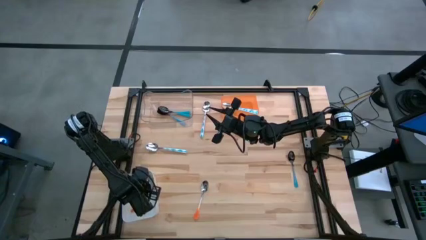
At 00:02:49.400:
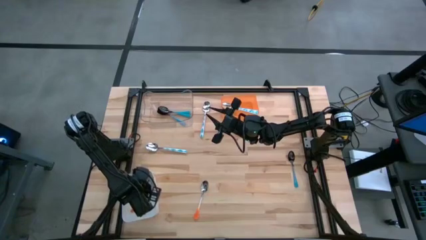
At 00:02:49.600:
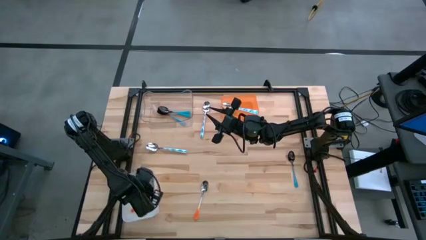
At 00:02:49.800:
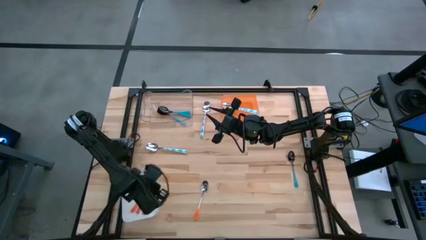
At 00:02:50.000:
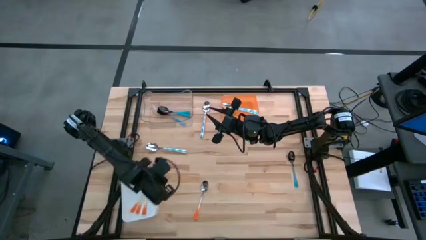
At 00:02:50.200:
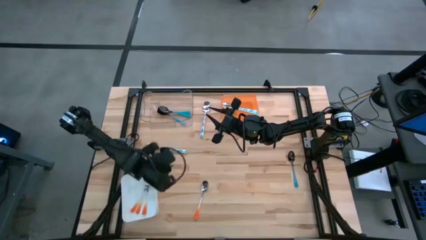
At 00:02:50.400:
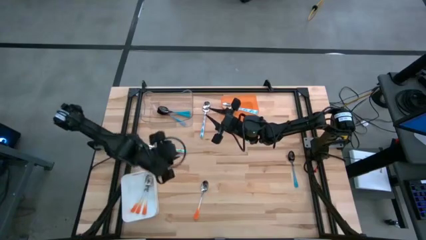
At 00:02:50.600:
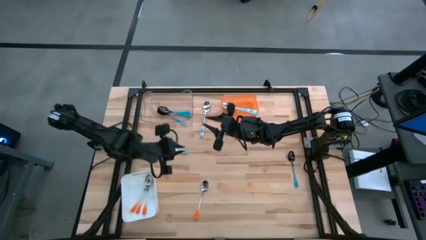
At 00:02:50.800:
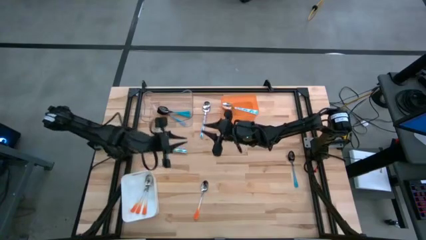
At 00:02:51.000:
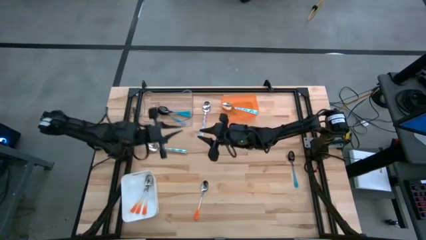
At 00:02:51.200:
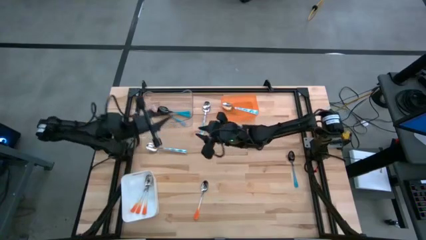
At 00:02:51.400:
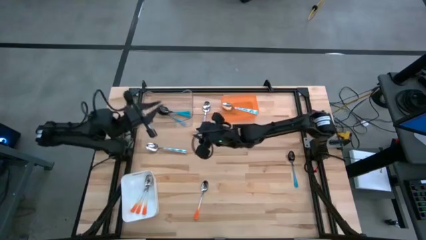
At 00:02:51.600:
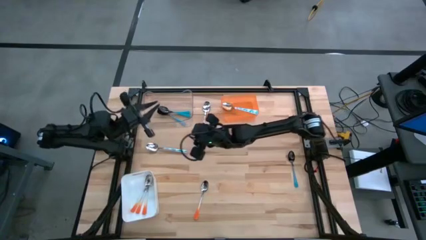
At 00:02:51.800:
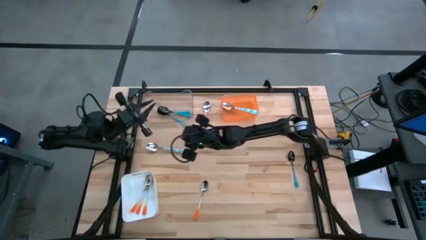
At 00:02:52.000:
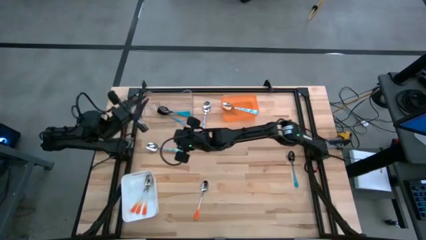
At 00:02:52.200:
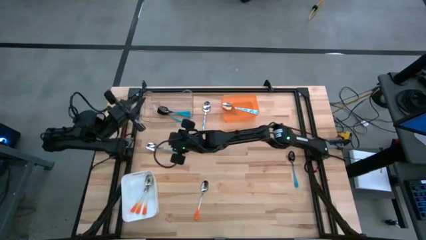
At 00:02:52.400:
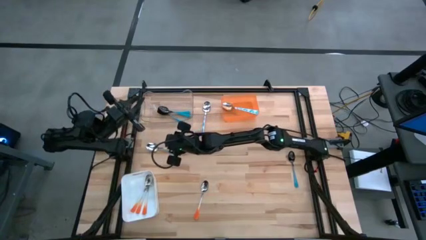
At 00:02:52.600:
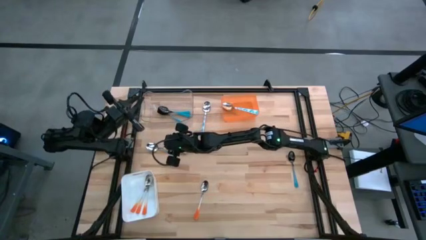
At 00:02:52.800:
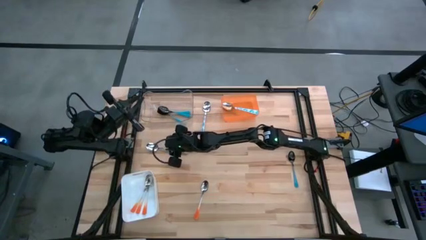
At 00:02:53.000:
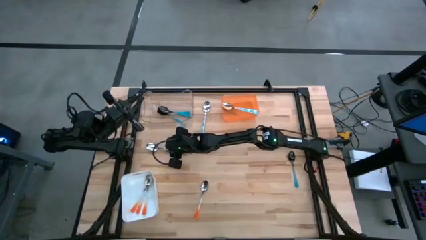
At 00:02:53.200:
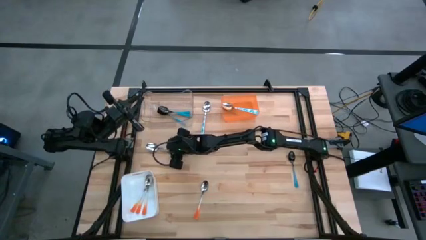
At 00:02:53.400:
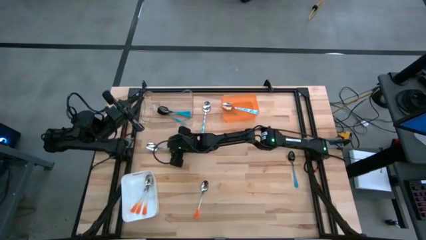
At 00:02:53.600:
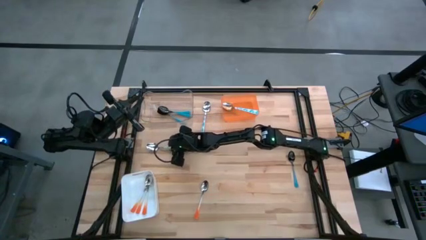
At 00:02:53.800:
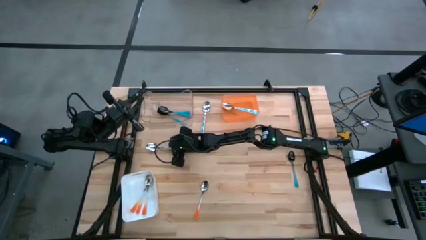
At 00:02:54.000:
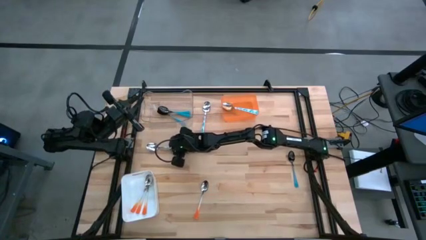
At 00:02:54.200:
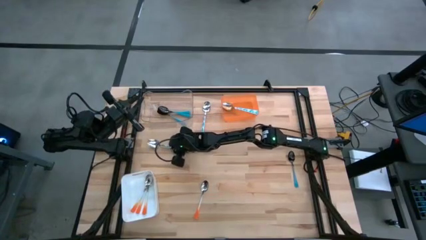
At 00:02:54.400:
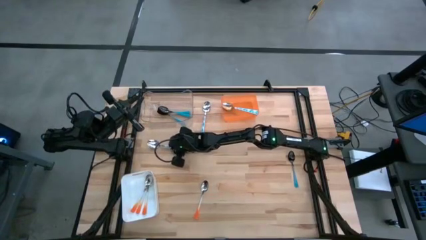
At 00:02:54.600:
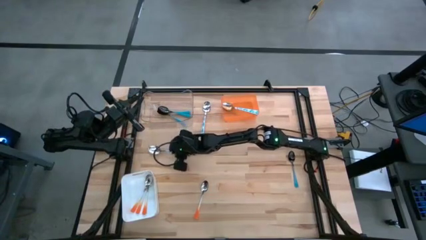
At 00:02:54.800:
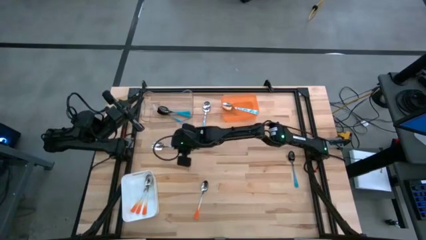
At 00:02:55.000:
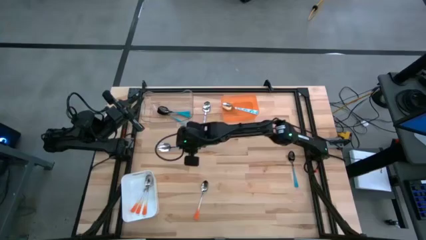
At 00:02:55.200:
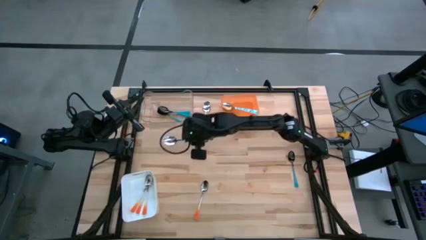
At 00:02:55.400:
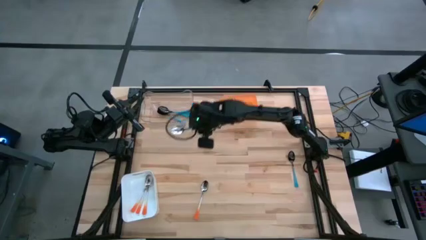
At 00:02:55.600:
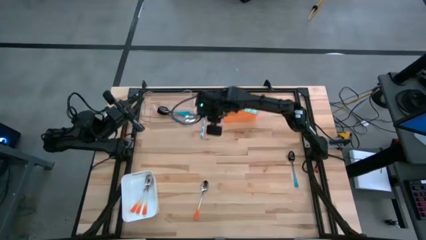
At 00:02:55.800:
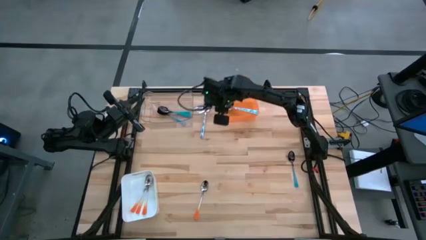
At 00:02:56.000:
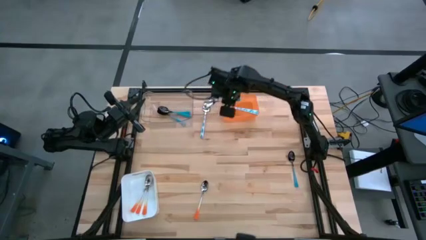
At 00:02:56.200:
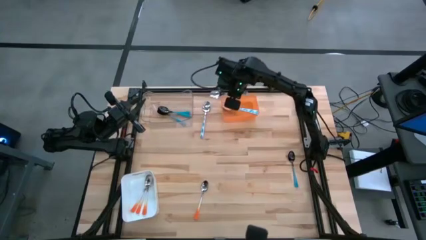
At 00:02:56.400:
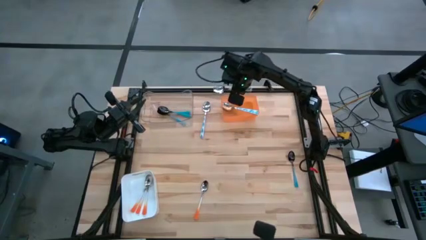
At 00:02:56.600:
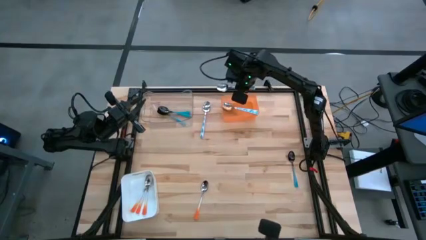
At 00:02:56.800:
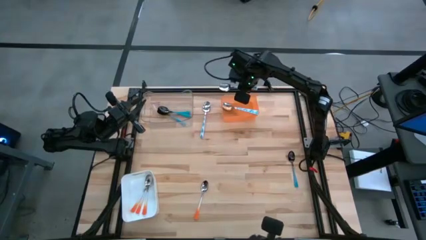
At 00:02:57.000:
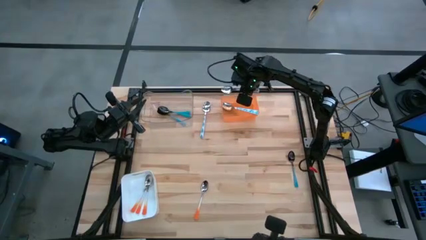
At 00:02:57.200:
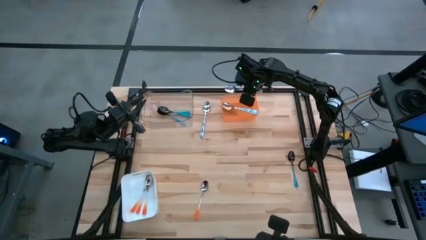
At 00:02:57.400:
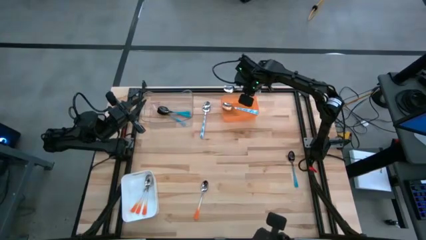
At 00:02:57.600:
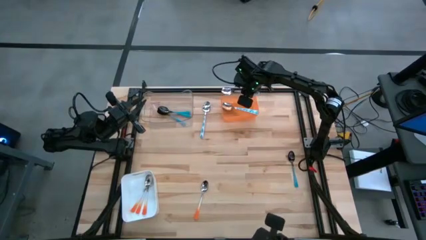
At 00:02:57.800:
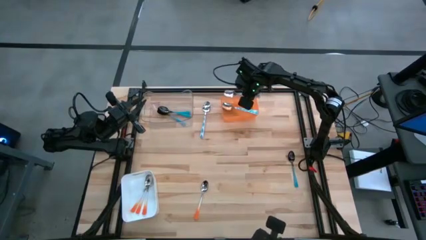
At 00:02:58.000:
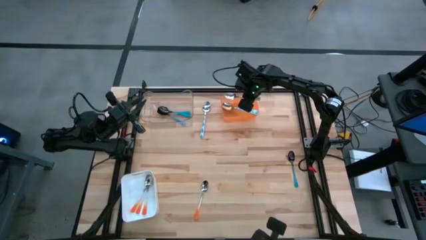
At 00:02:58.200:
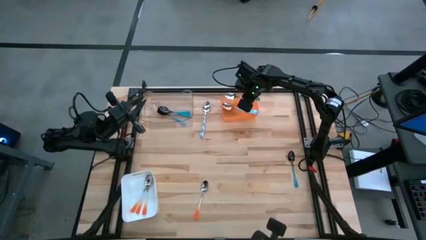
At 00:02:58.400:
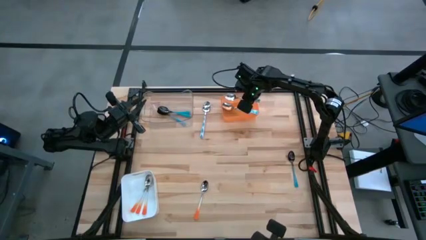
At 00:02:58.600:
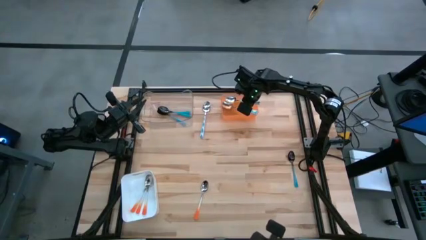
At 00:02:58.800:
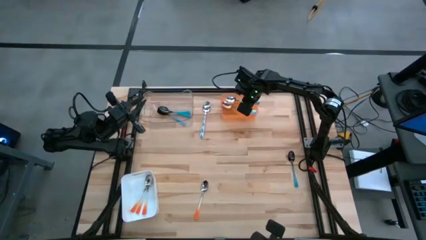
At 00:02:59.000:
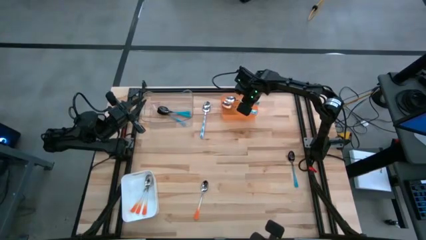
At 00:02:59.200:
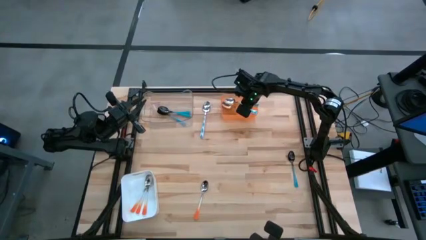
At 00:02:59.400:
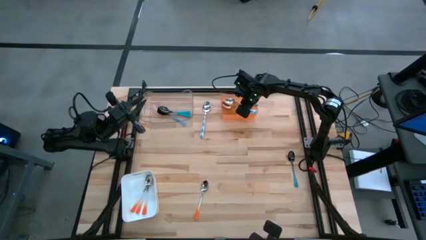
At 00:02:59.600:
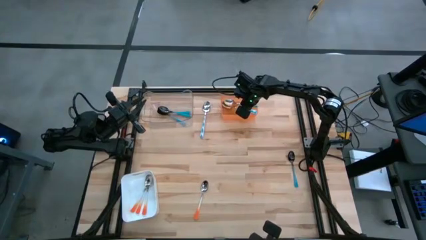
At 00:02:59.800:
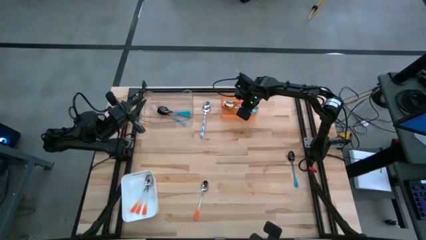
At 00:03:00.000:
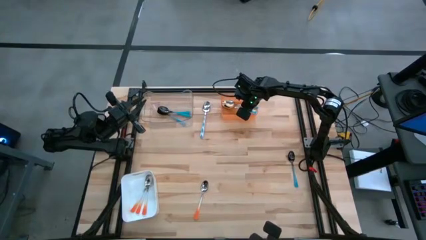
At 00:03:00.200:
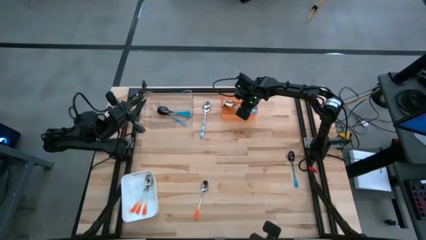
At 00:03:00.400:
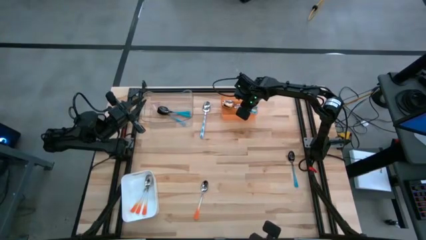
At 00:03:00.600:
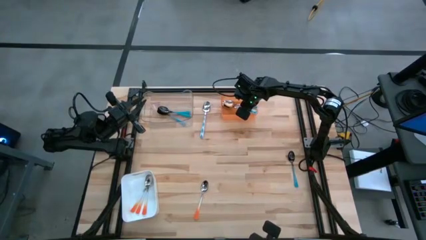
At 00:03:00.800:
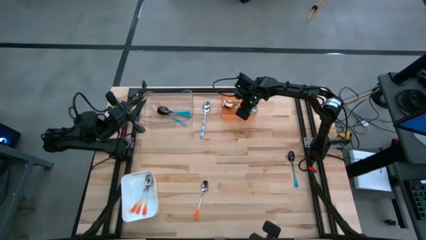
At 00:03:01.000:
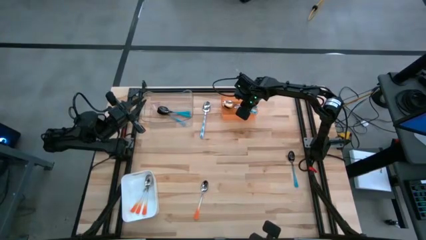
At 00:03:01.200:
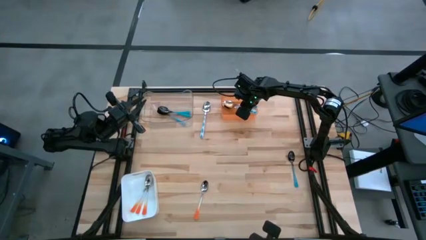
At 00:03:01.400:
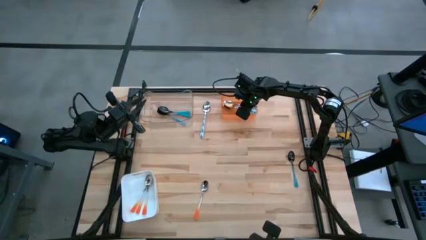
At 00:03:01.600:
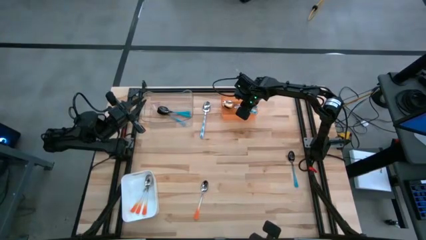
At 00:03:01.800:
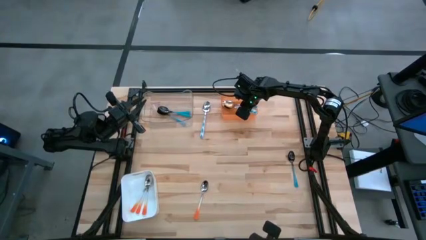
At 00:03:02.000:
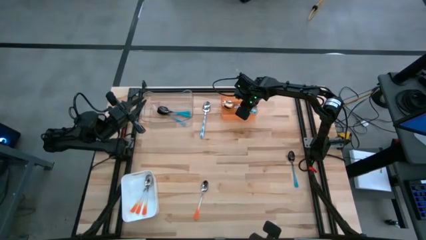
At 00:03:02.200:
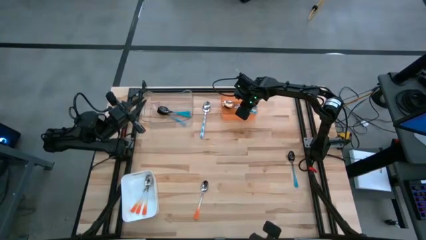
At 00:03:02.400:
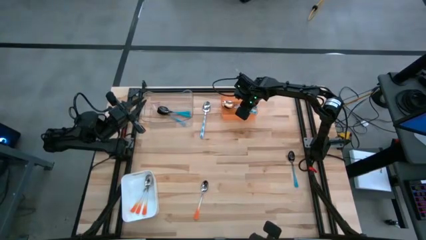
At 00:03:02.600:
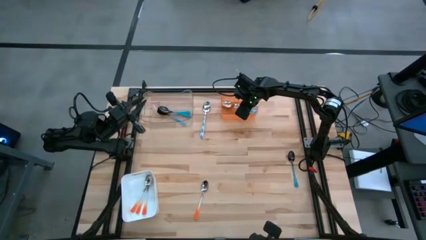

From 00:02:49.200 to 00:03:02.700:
Task: Sort silverware by color (type)
Put the light blue spoon into the orange bin

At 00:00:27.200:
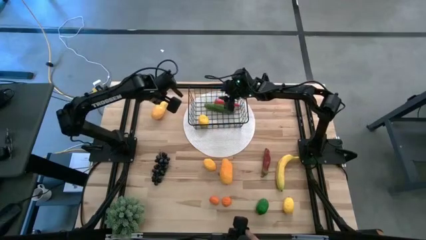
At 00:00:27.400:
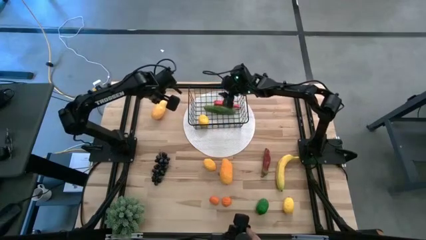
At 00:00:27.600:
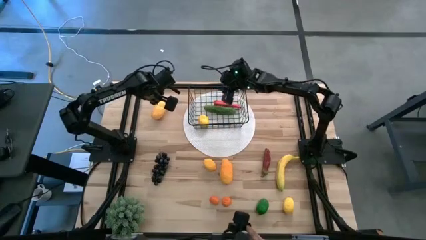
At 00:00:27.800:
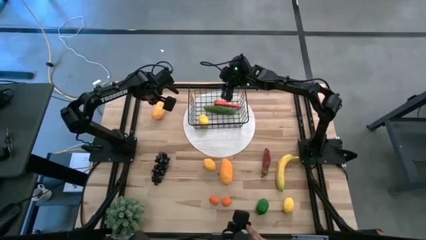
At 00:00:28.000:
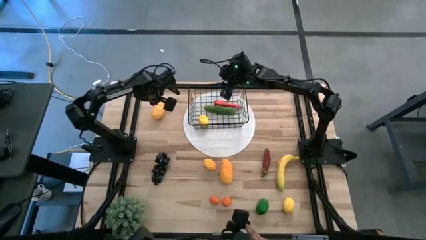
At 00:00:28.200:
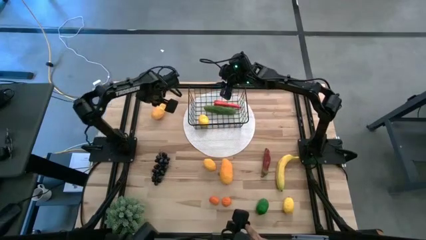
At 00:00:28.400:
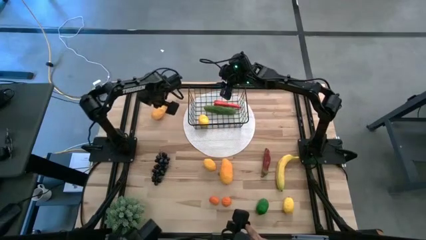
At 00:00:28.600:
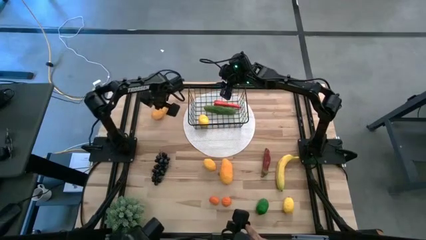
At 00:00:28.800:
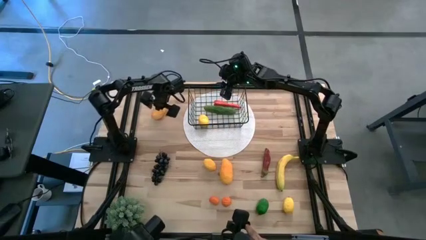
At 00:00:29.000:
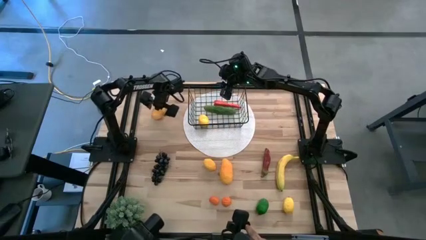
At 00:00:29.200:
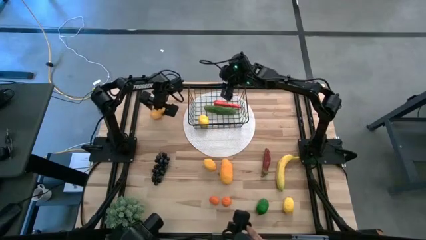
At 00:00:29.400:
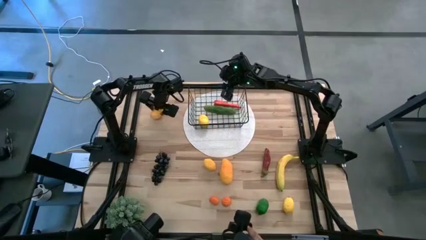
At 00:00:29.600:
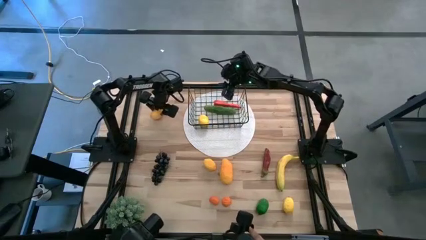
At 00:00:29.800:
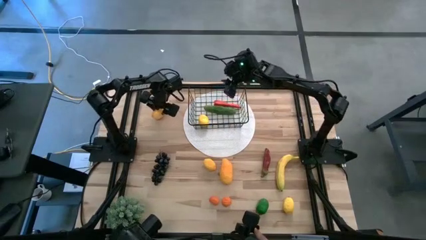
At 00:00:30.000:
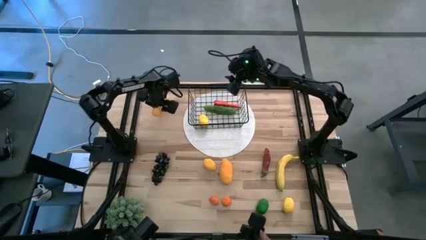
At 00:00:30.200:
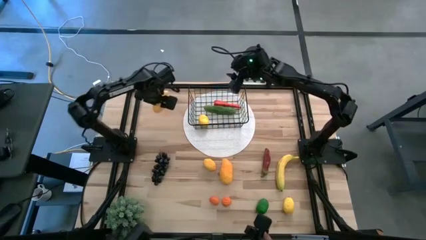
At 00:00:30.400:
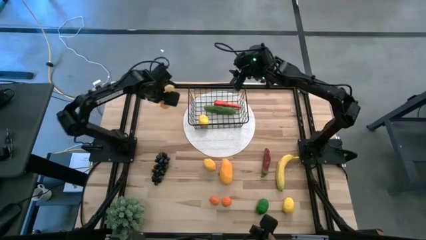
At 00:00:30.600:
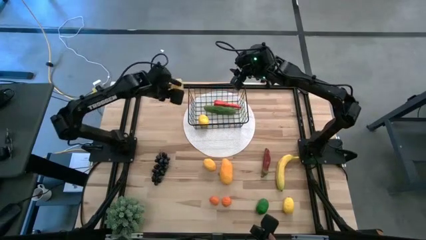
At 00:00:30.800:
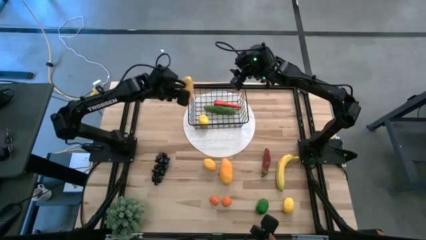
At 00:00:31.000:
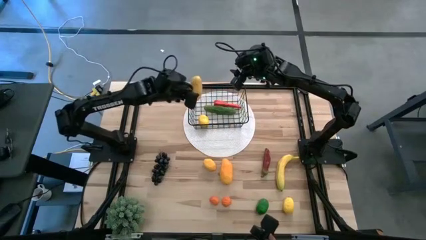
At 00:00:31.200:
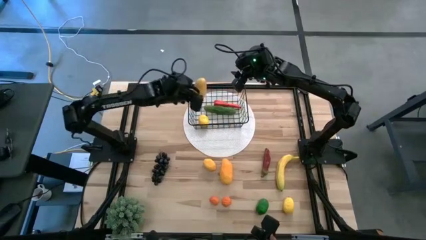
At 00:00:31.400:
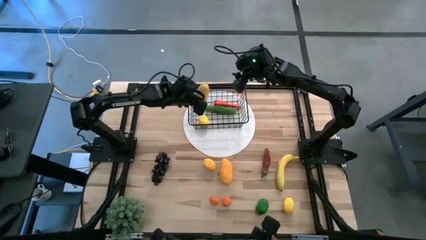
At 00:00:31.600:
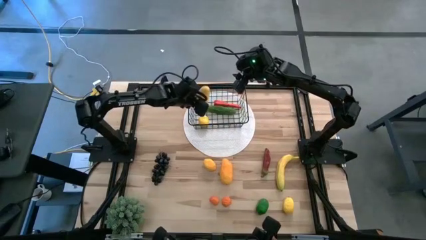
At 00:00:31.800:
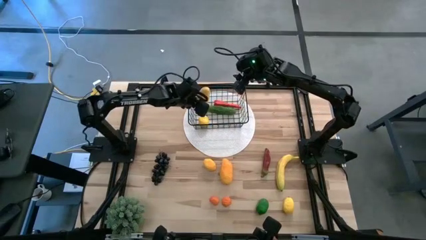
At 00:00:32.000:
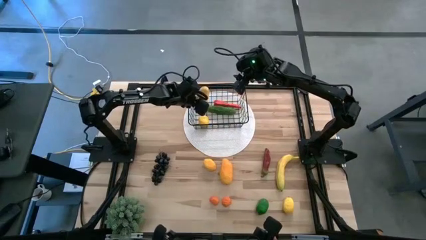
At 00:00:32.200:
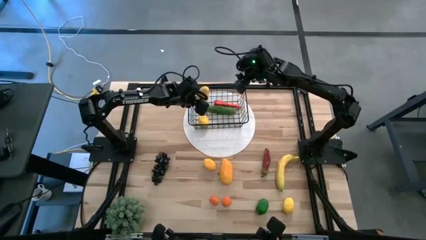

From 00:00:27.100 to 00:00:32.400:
Task: Build produce basket
Put the top mango into the black basket
